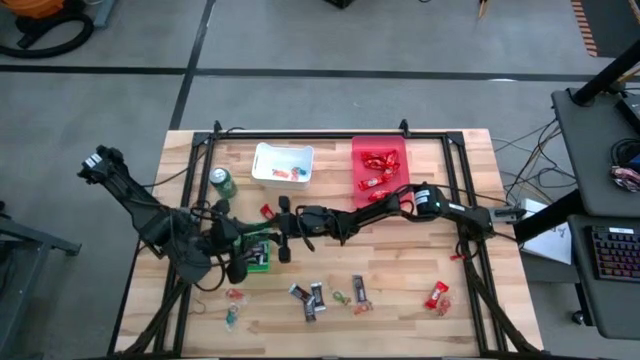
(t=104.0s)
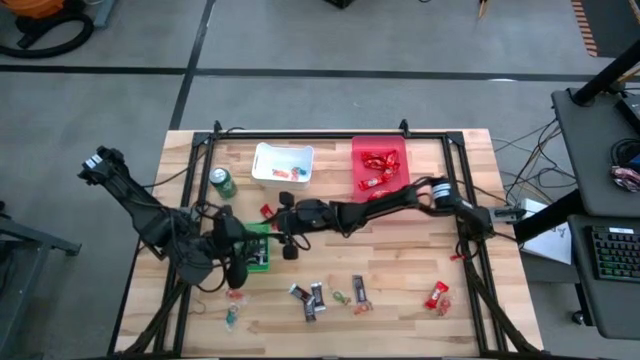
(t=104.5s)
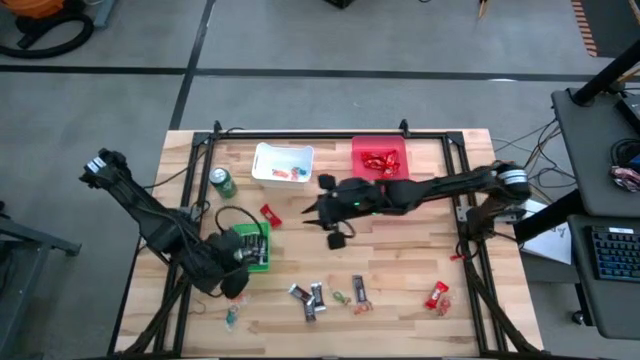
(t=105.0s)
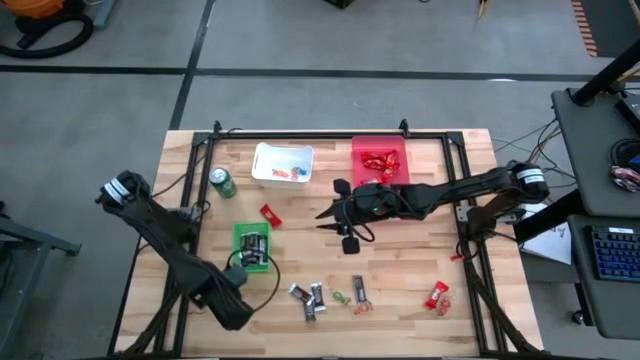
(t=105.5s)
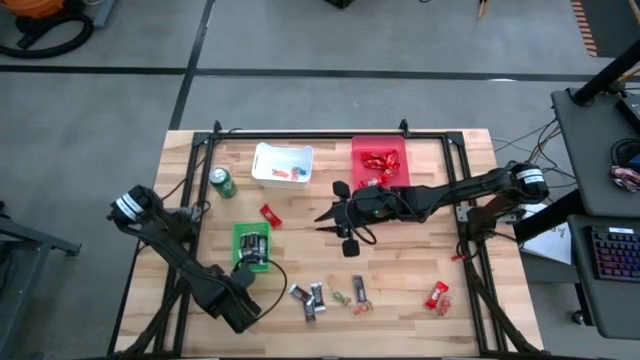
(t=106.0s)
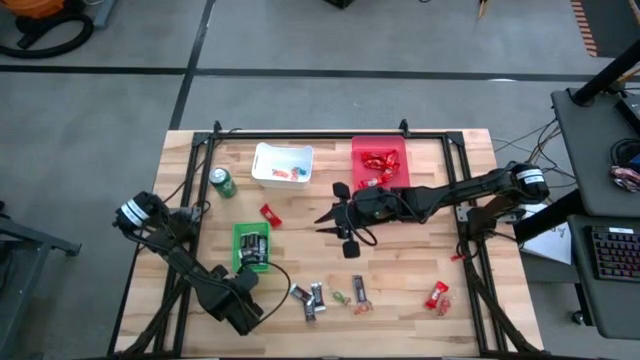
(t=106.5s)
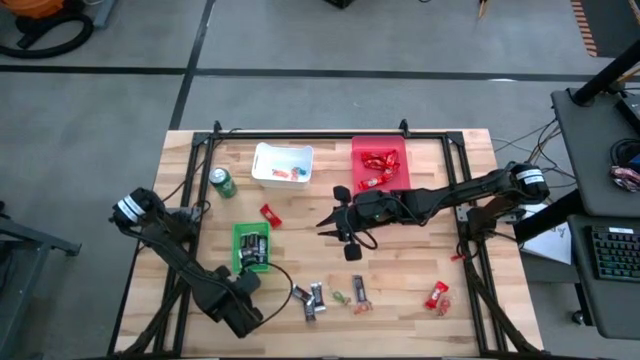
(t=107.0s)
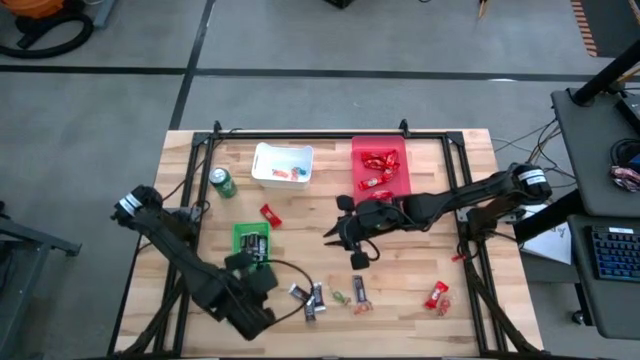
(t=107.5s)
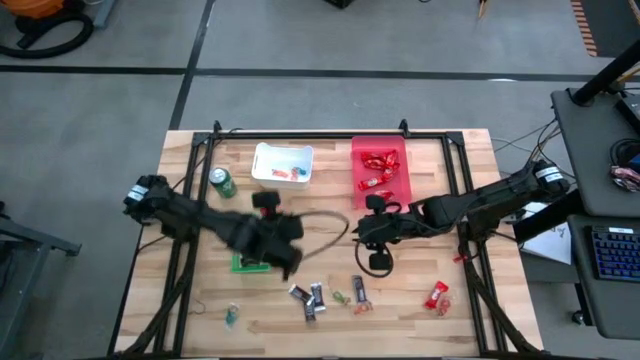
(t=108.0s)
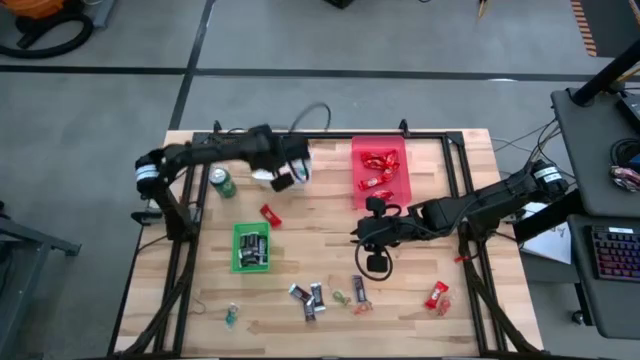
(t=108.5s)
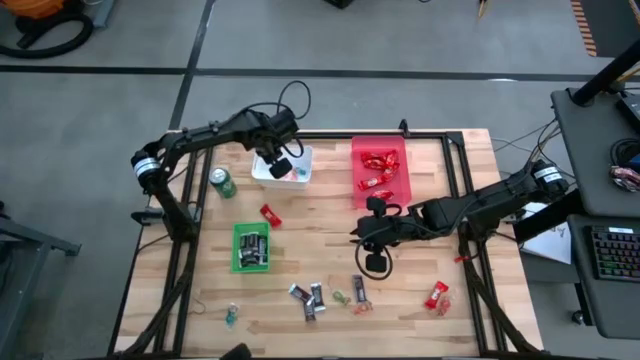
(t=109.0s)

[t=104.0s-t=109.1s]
Task: Organize candy in baskets
Put the red gummy into the white bin

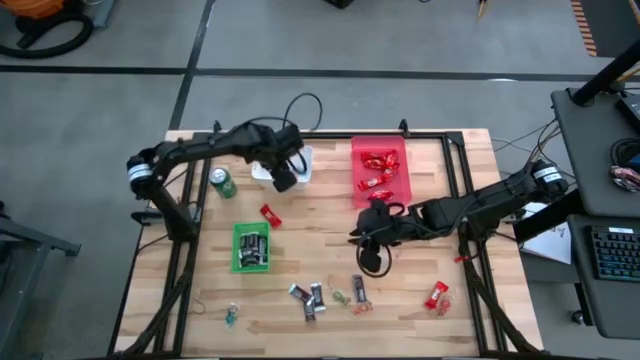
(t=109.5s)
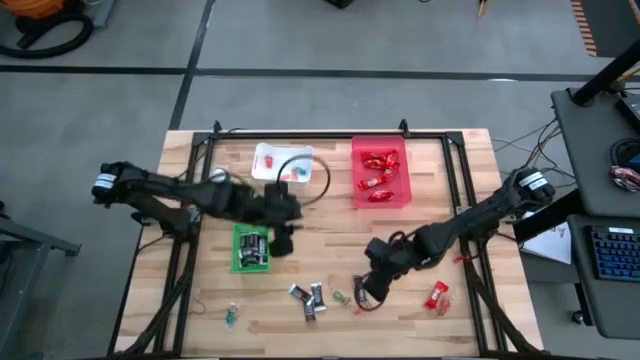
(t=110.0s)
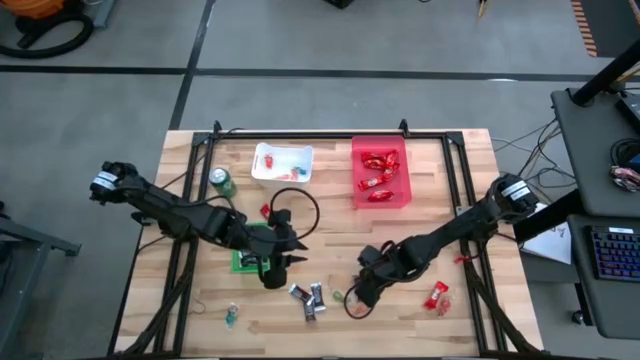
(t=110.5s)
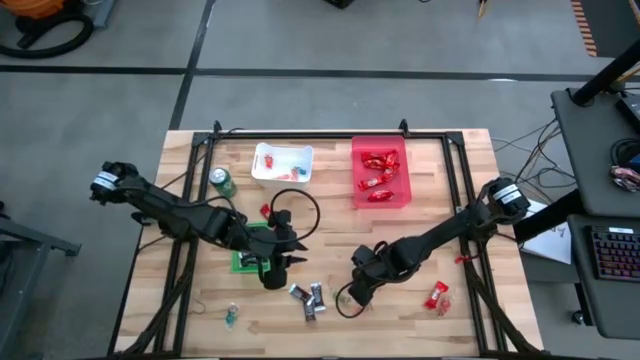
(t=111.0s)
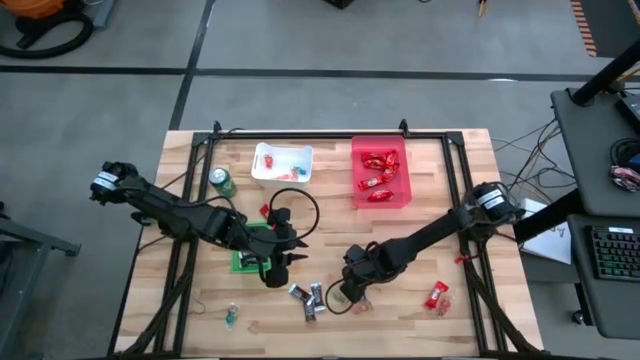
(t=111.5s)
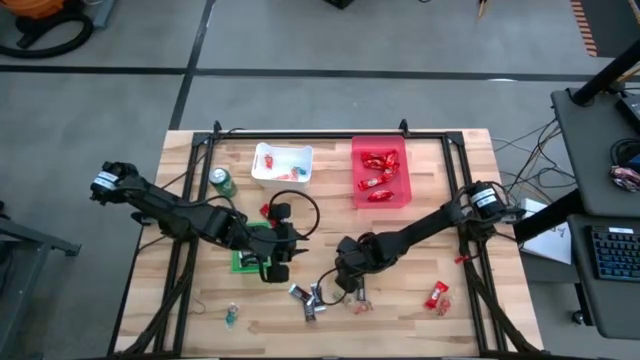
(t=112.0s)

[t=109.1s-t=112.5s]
Put the brown chocolate into the green basket

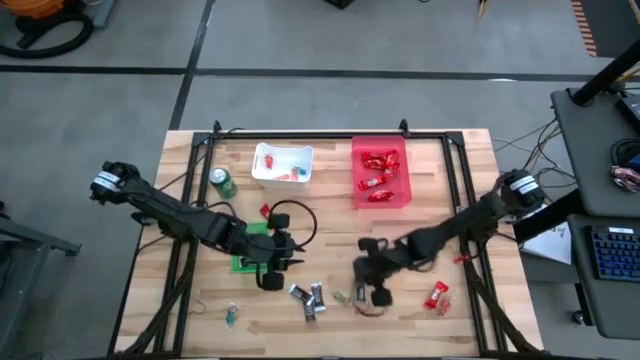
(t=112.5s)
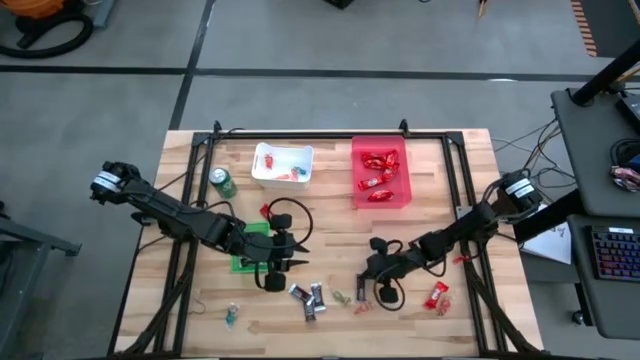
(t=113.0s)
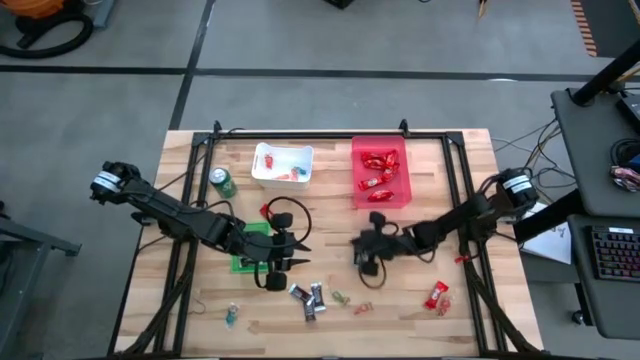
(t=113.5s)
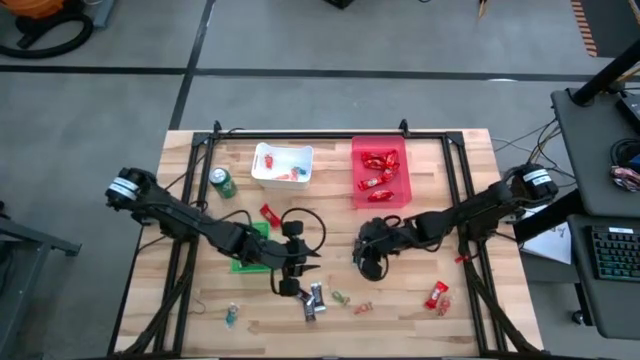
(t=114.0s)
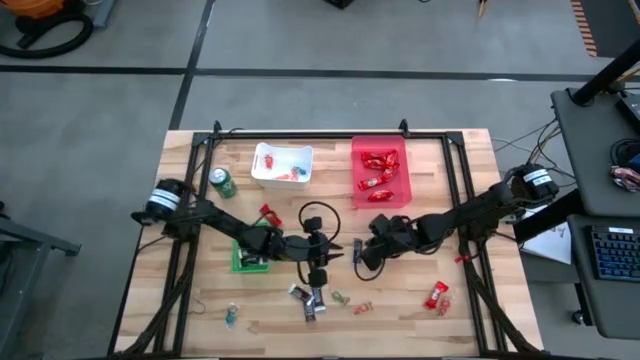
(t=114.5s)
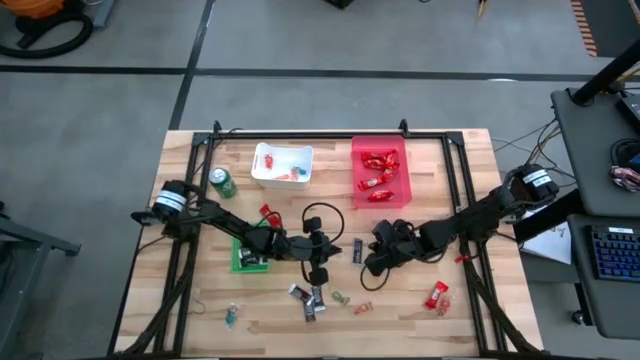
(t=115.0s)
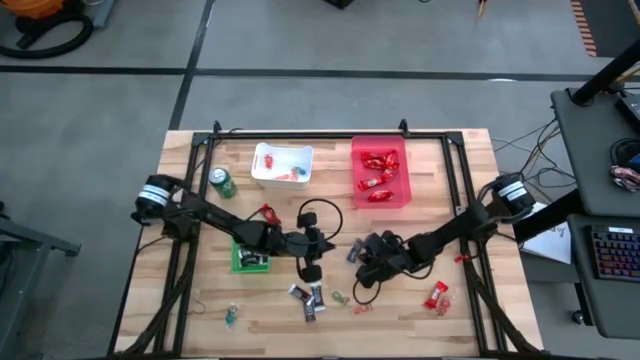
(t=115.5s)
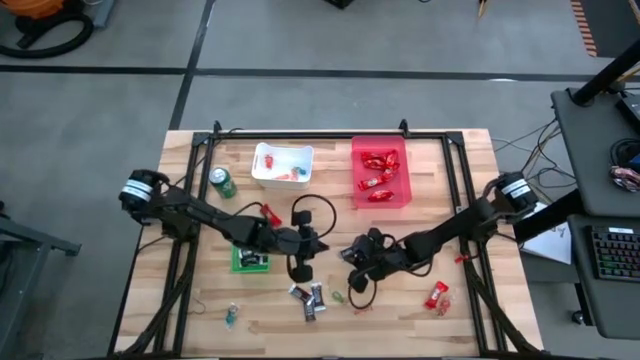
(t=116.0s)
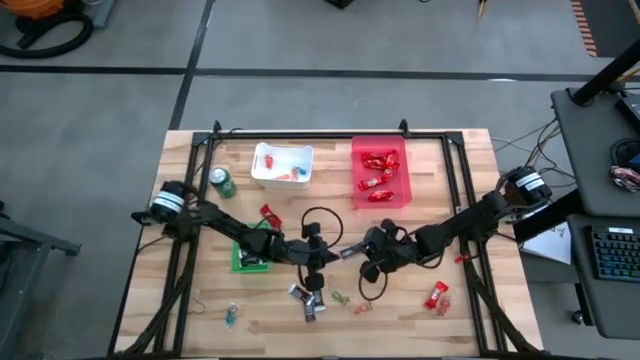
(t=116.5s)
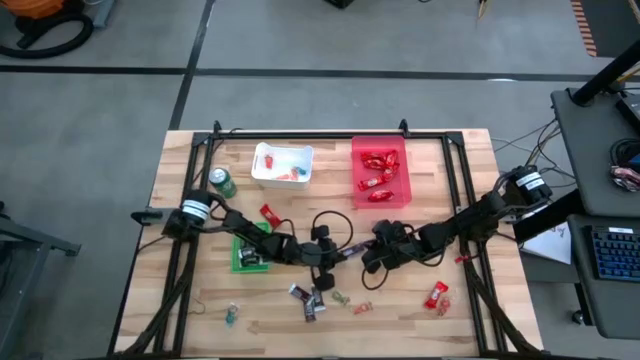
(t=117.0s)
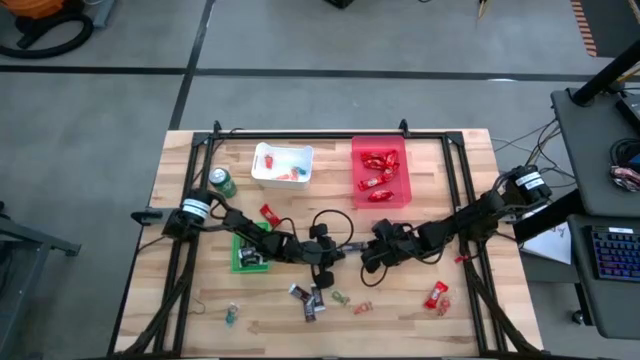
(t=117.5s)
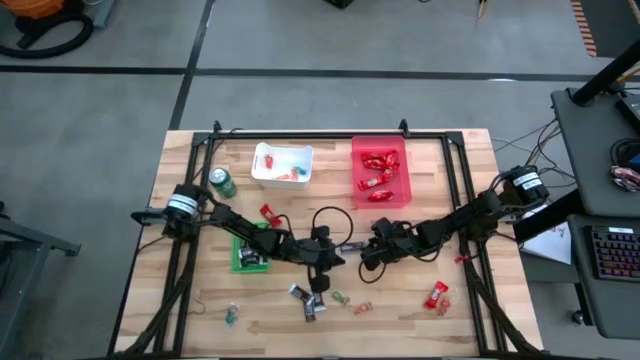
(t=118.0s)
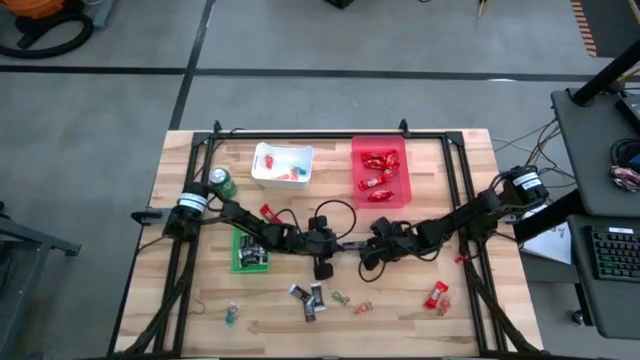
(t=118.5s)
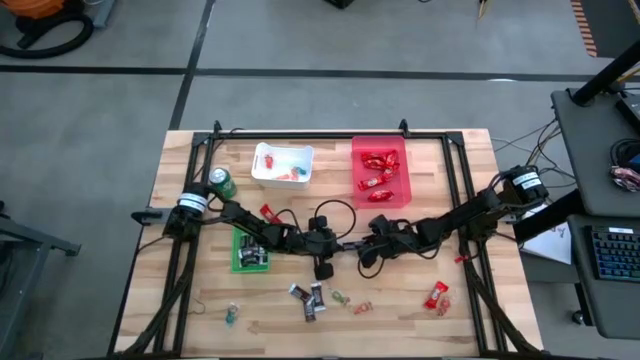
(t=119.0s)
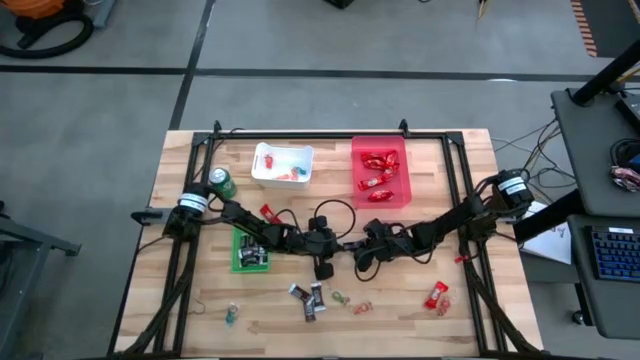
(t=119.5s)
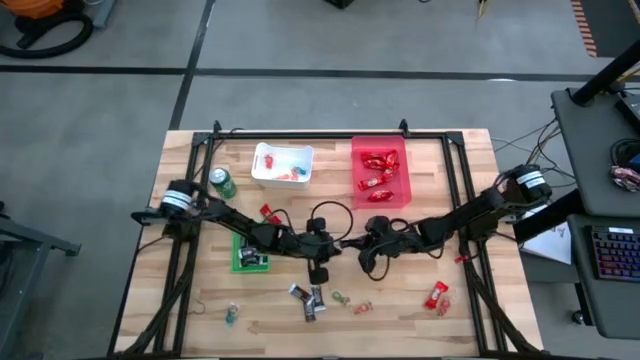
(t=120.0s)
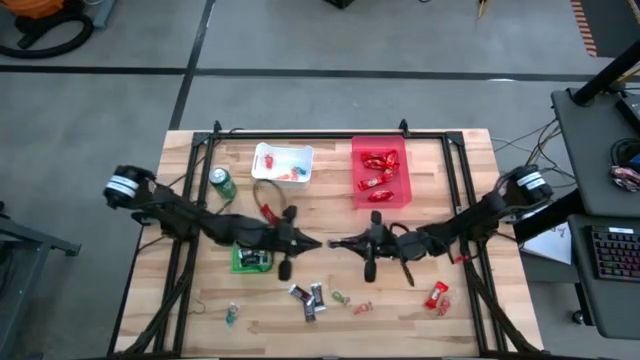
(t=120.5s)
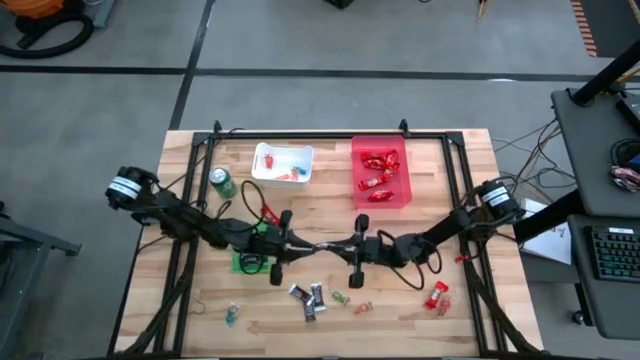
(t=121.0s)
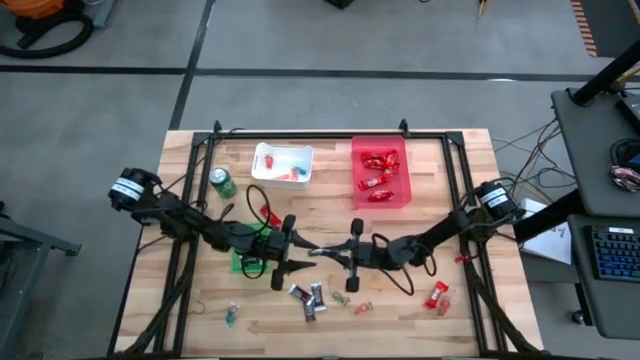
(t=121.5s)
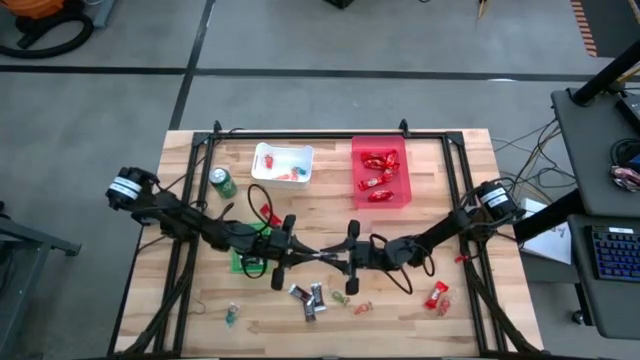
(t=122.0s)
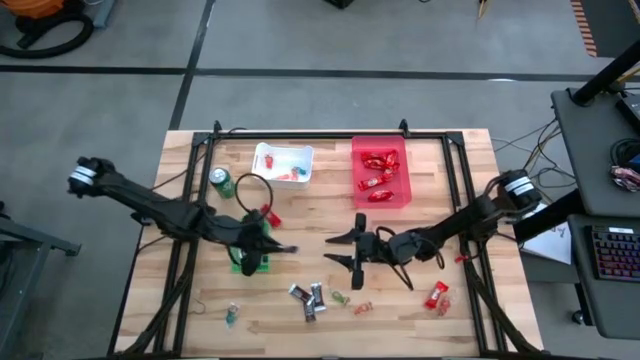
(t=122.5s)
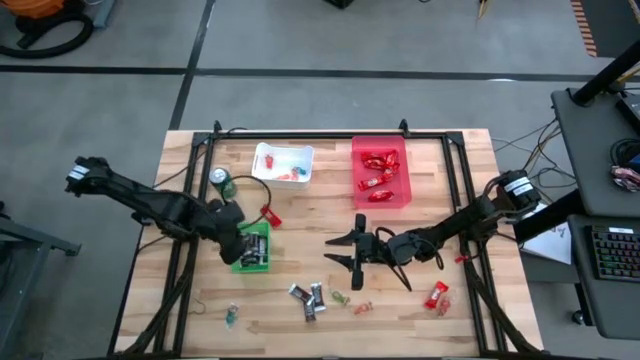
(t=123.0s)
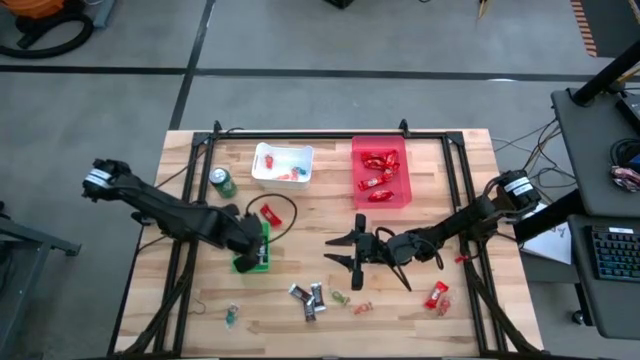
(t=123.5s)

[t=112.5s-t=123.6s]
Put the brown chocolate into the green basket

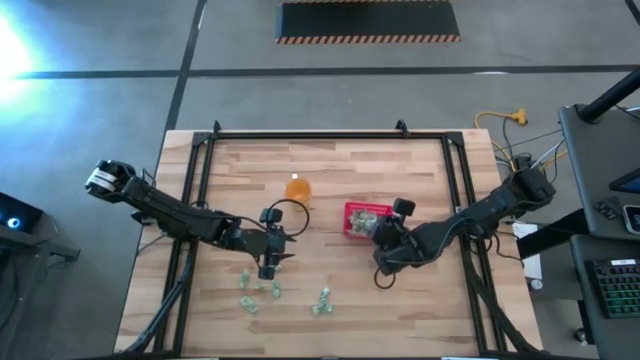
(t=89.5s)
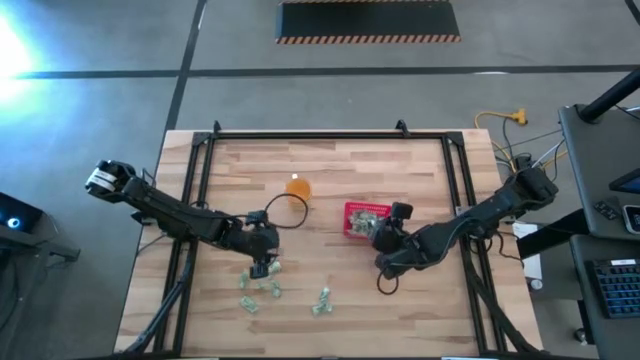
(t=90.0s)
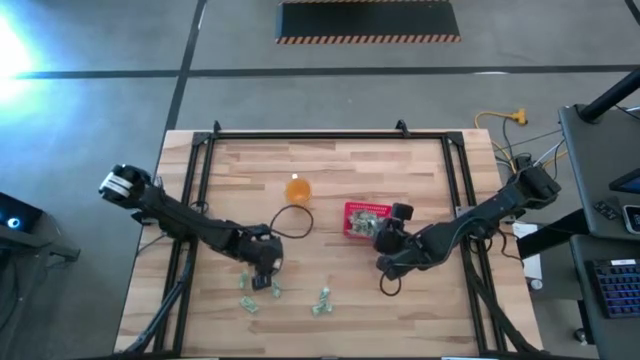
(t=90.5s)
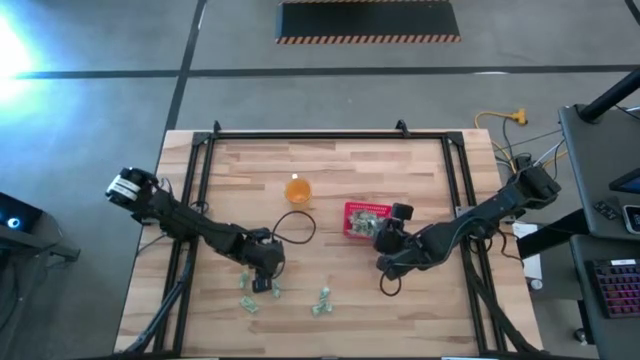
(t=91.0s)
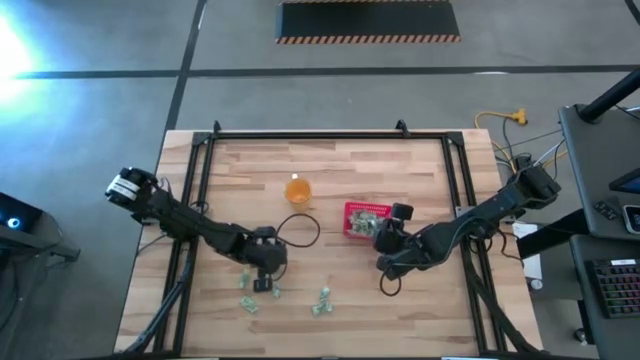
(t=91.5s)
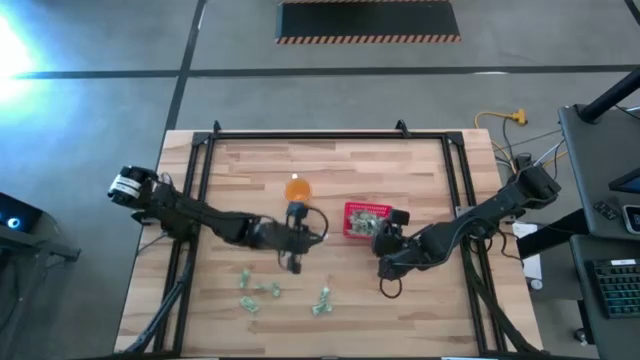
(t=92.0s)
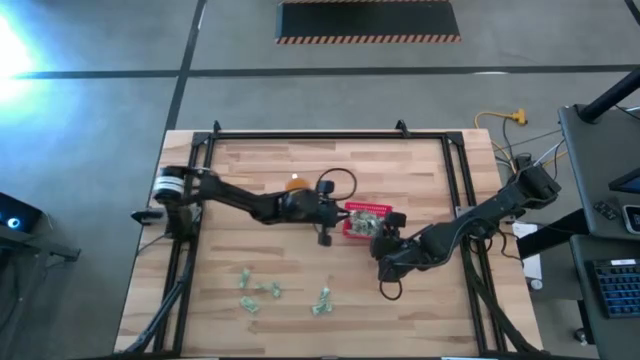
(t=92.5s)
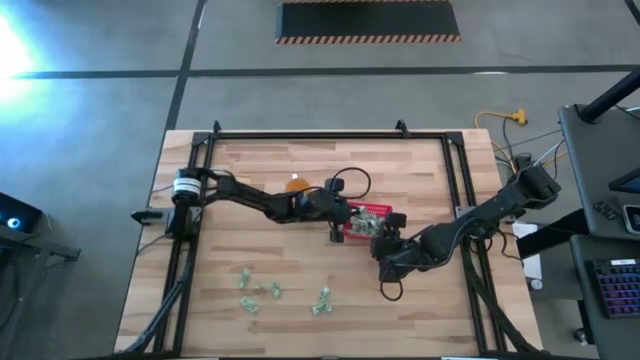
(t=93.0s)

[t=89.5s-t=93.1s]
Task: Pick and place Stevia / Truvia into bins
Put the stevia packet into the basket
